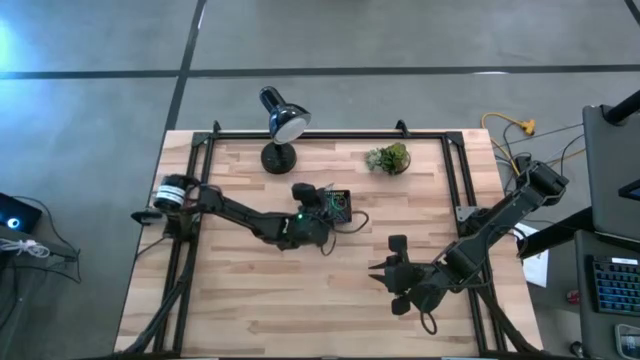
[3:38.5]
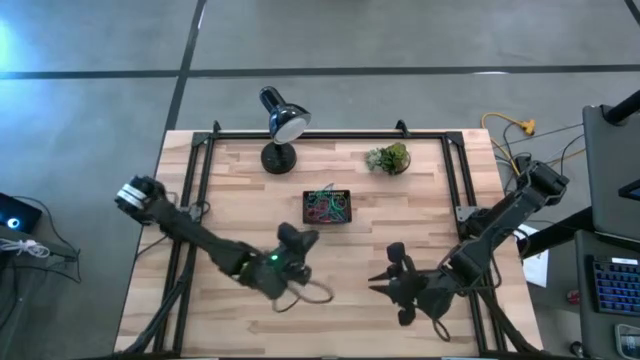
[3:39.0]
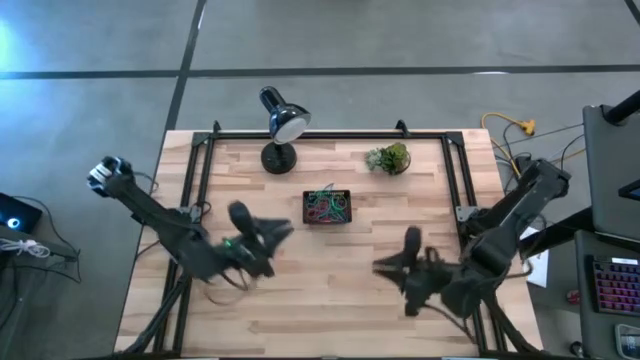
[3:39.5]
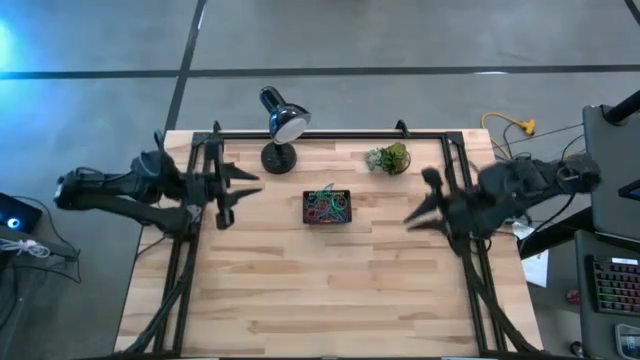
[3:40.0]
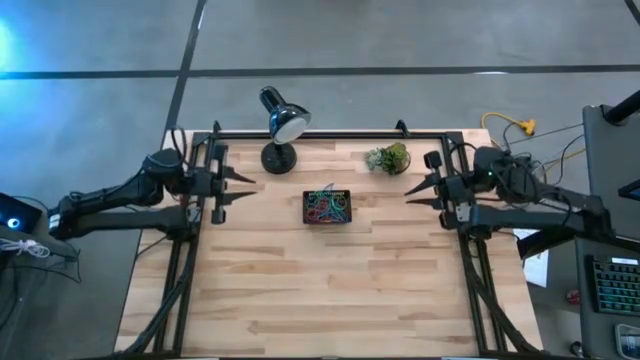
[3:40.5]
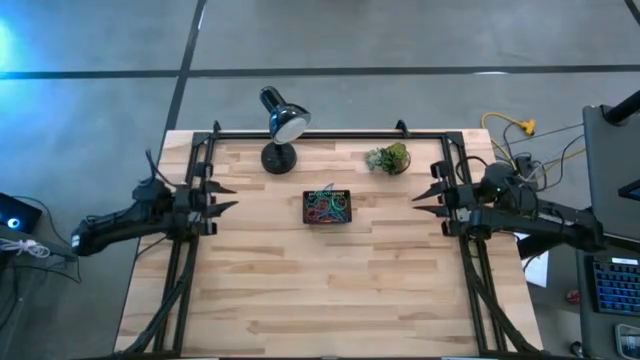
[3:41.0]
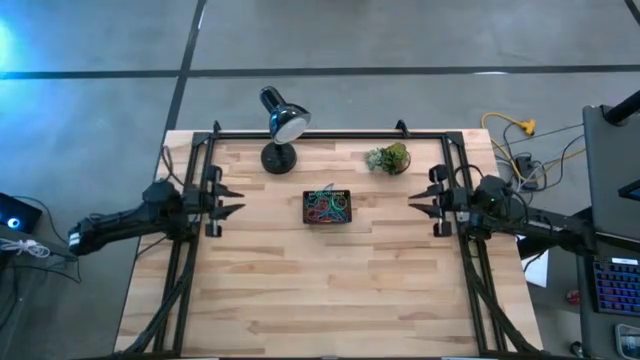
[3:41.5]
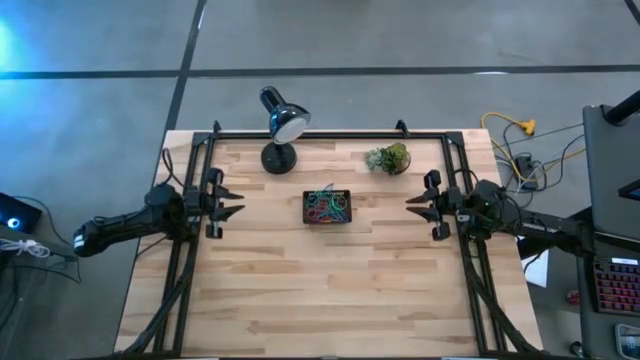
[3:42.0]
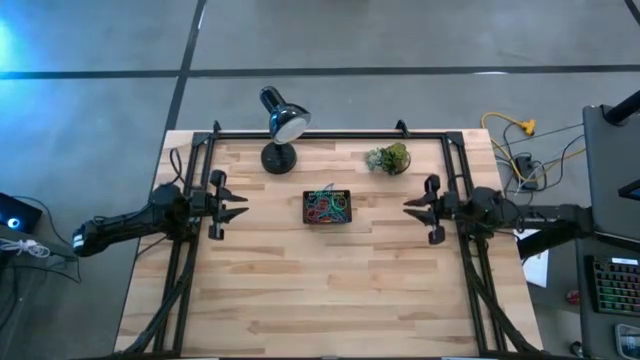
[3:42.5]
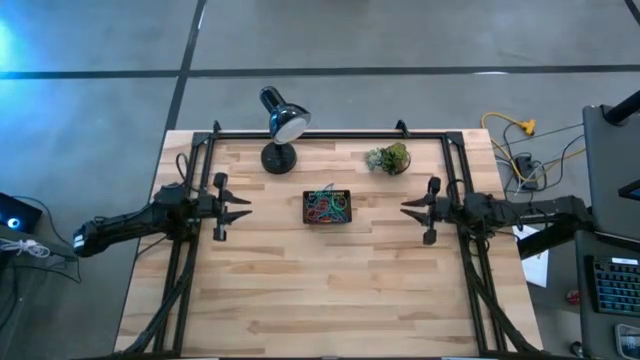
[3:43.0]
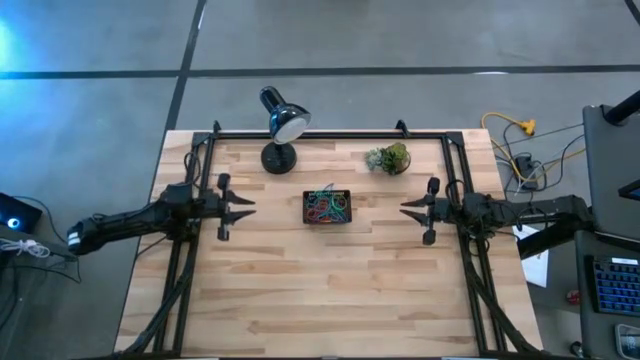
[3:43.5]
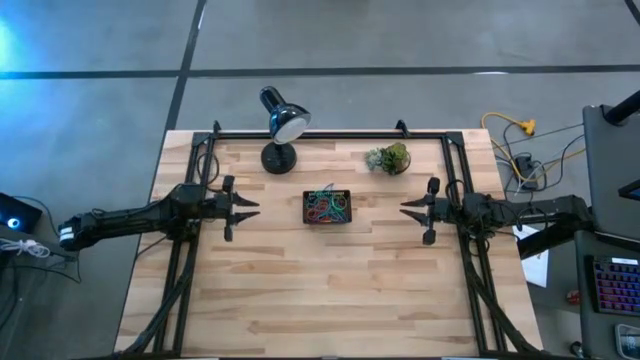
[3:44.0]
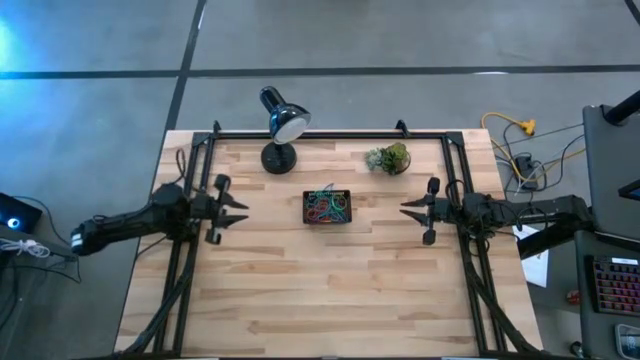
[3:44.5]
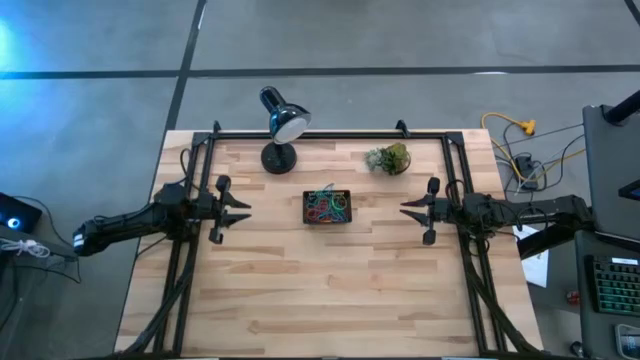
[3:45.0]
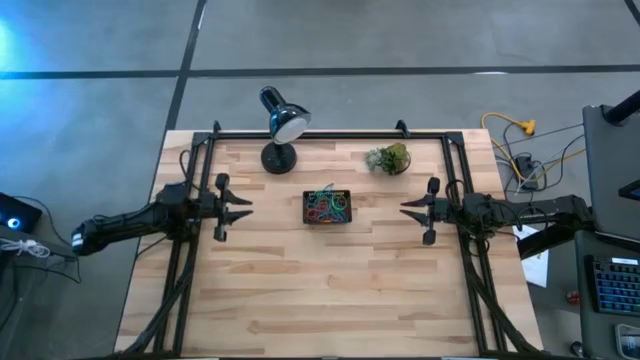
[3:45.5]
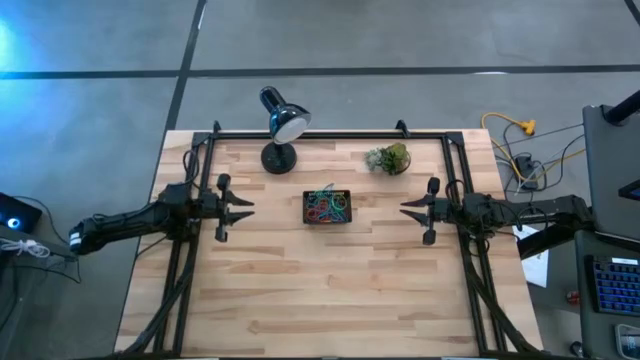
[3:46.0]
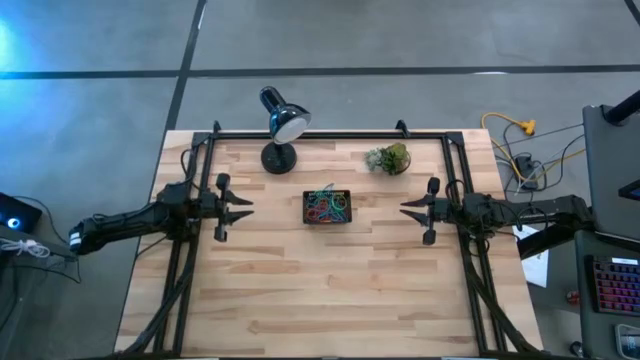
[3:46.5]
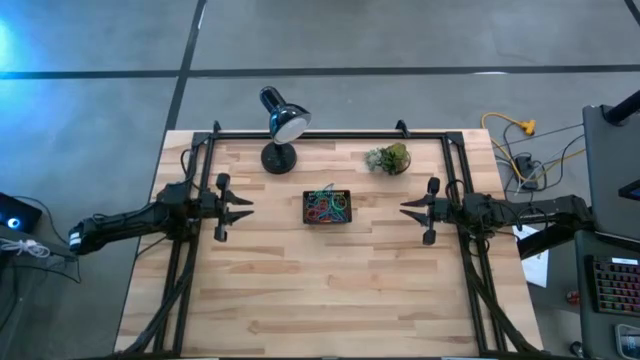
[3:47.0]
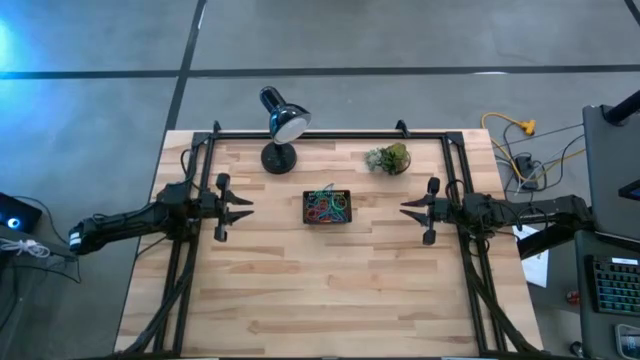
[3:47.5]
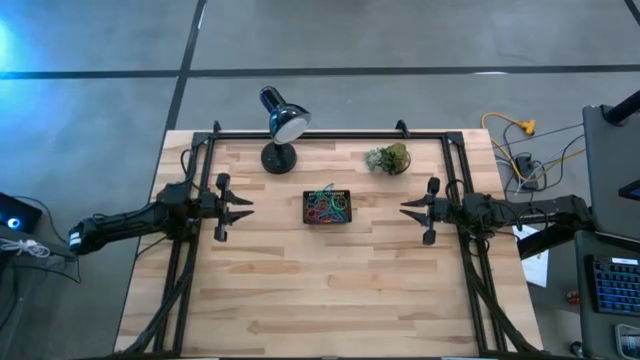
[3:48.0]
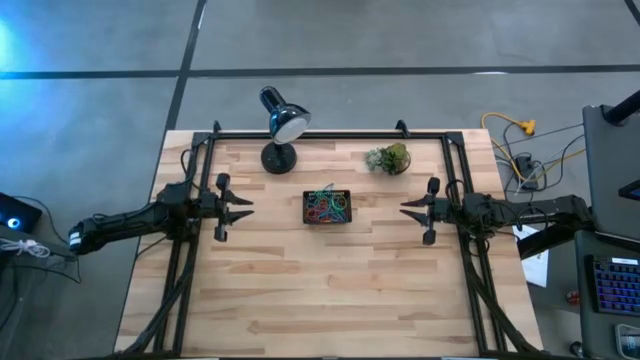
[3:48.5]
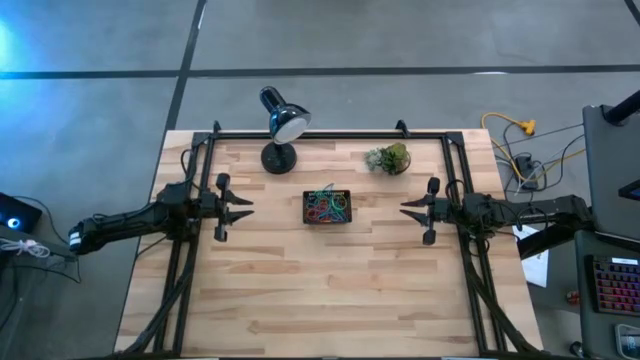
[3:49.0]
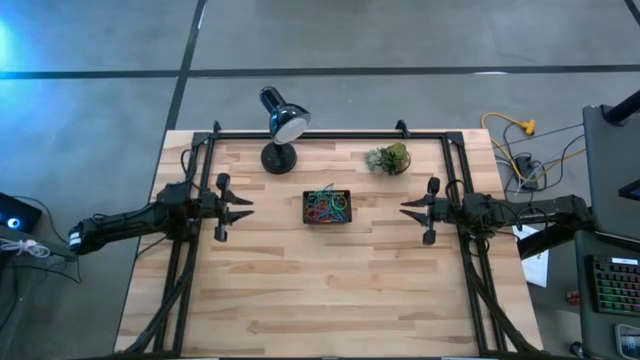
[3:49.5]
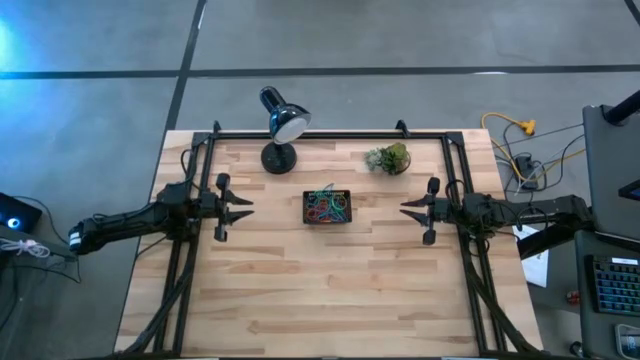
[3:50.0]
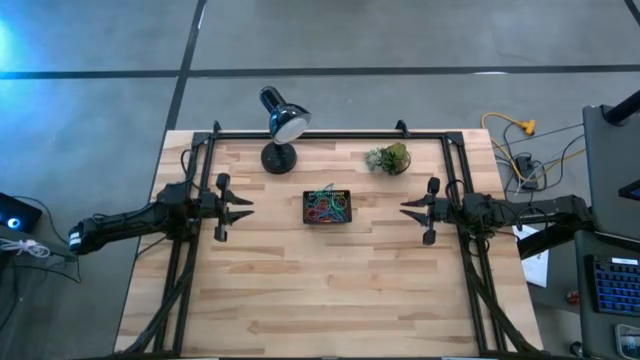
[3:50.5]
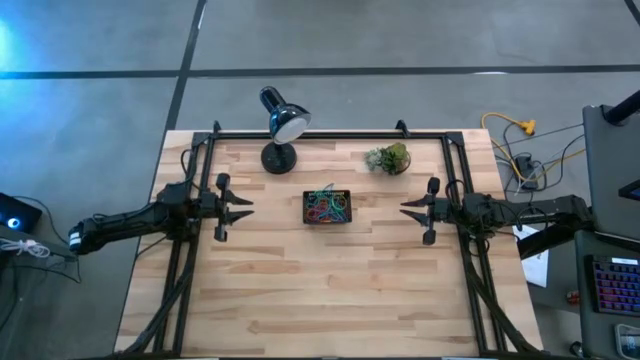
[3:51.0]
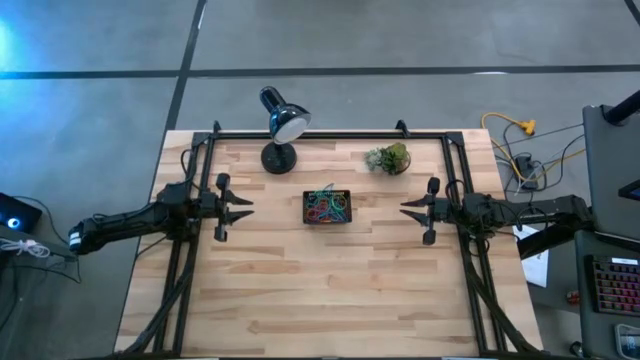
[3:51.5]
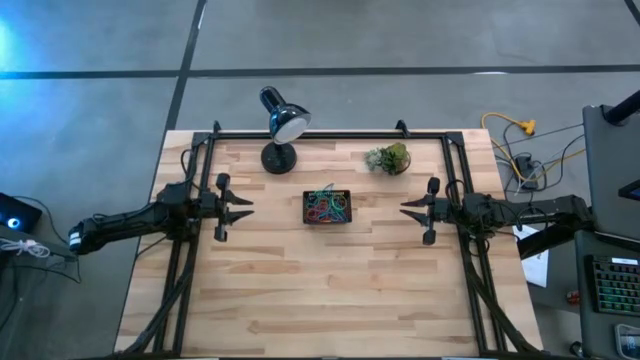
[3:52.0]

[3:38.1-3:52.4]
Task: Pick and place rubber bands into bin
Return to Home Position

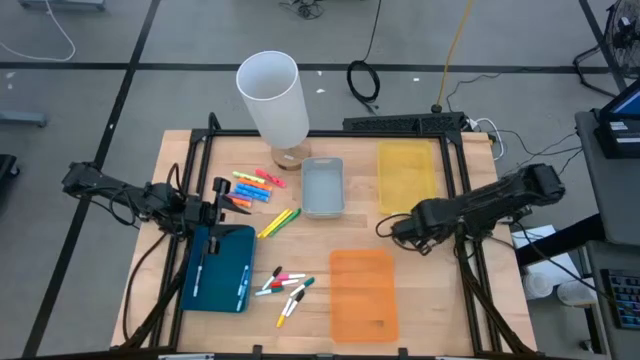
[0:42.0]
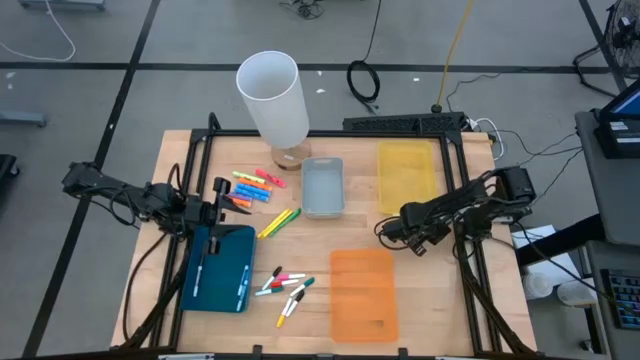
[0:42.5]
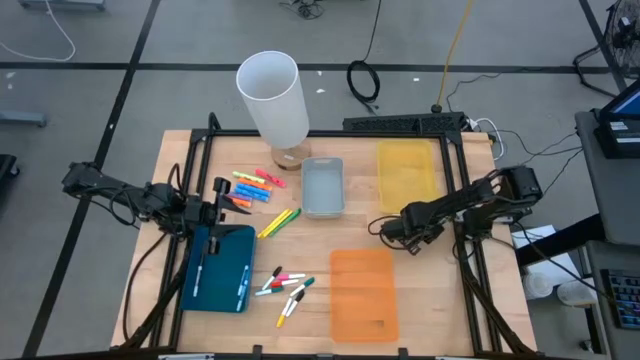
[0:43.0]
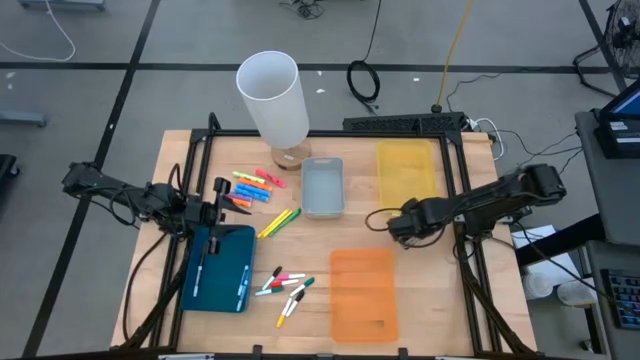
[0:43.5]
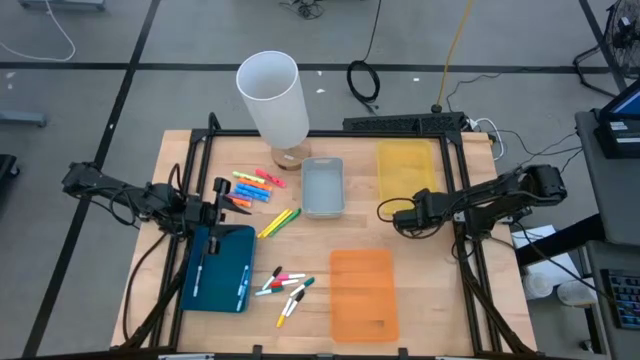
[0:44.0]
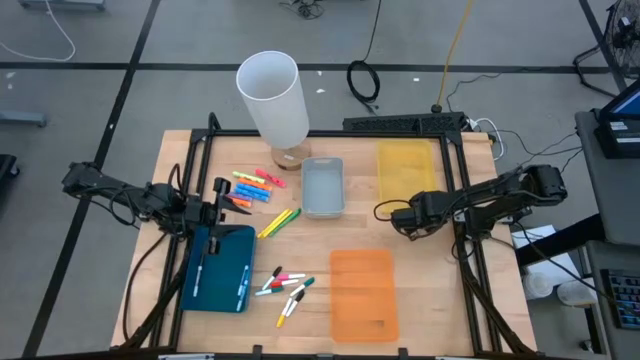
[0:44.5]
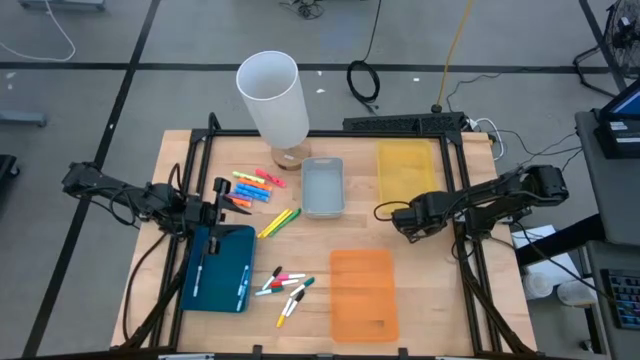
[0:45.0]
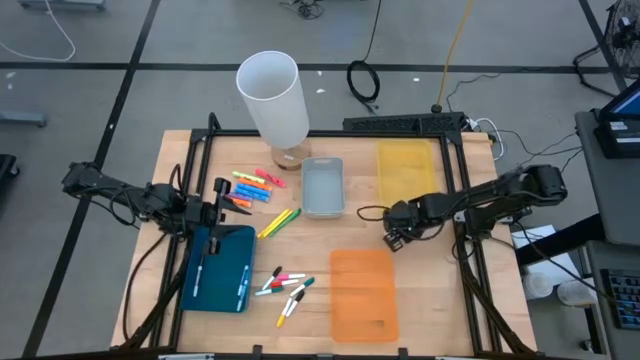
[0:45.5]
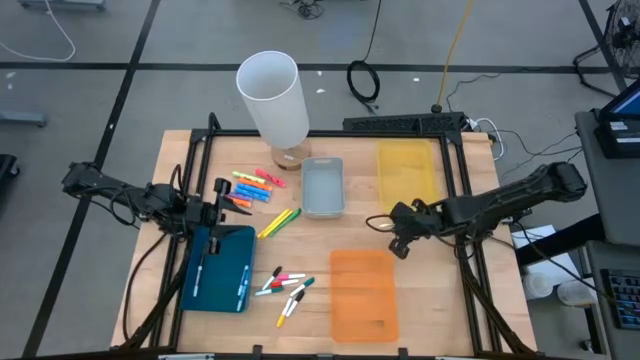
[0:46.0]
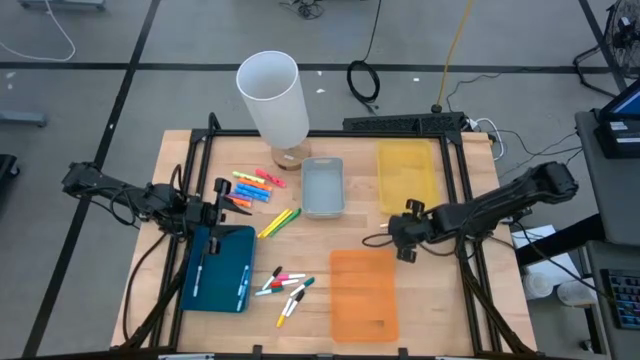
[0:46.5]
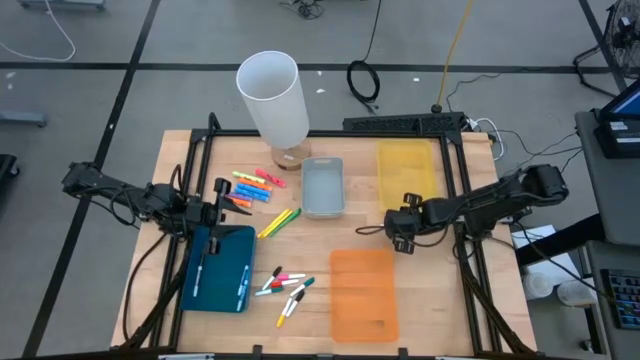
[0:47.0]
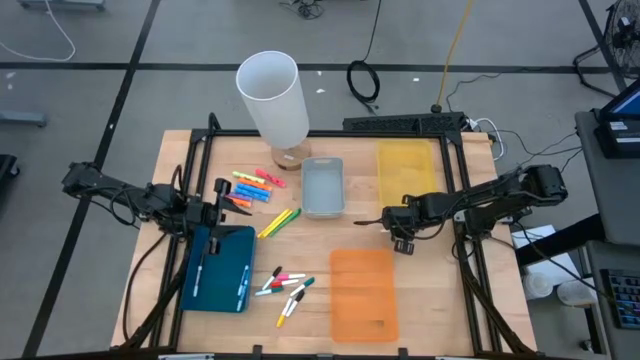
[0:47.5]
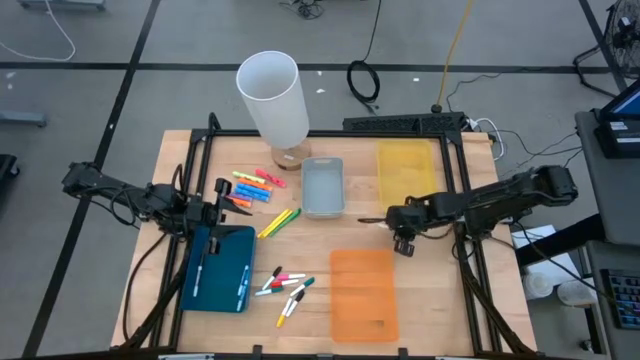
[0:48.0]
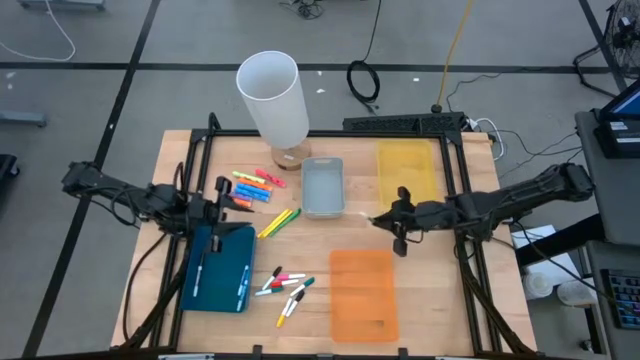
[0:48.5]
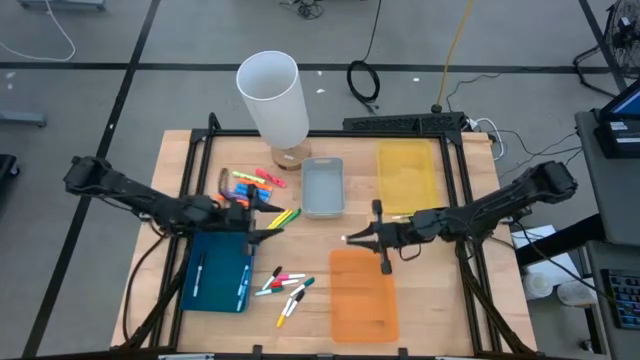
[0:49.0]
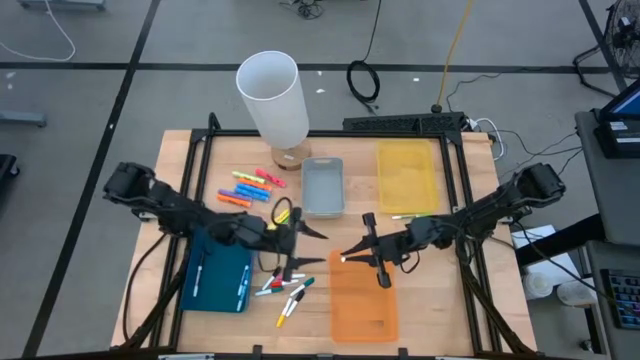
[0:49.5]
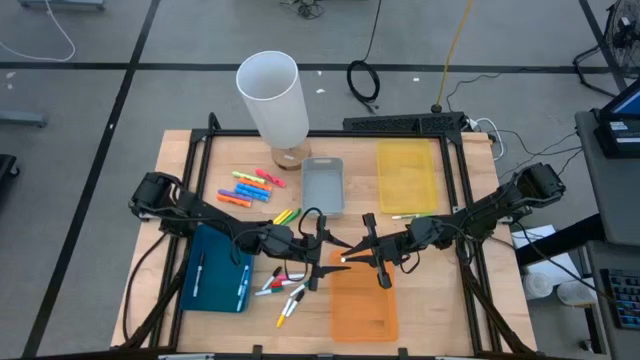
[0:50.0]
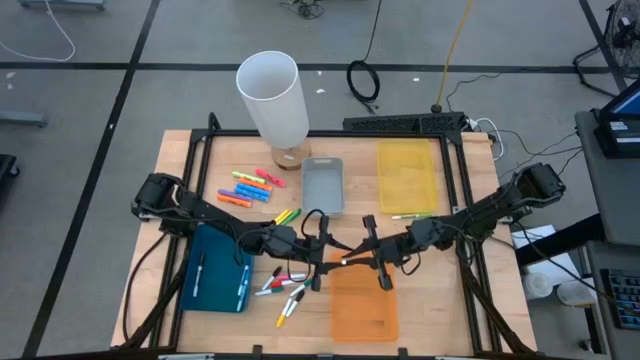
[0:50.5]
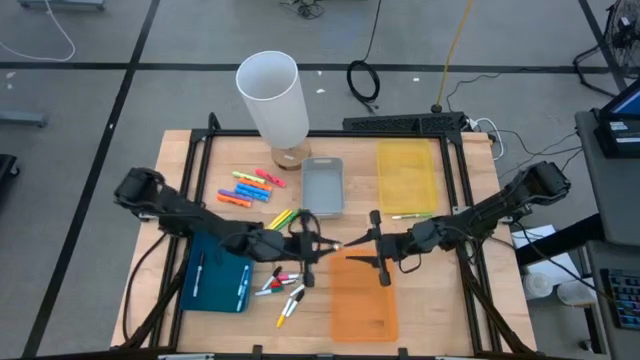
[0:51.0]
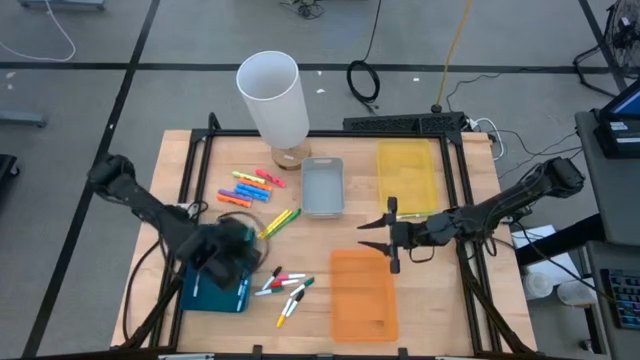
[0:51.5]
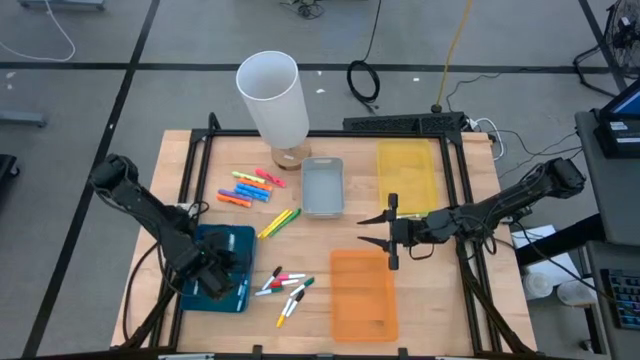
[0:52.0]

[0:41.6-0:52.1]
Task: Pick & Place Markers
Put the right green marker pen into the blue bin
